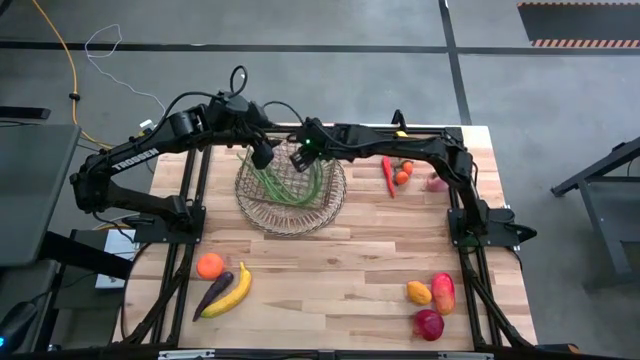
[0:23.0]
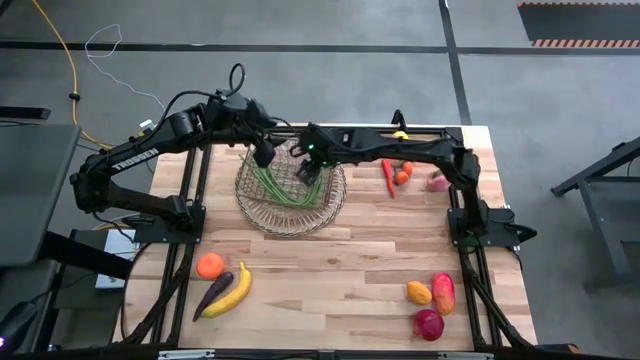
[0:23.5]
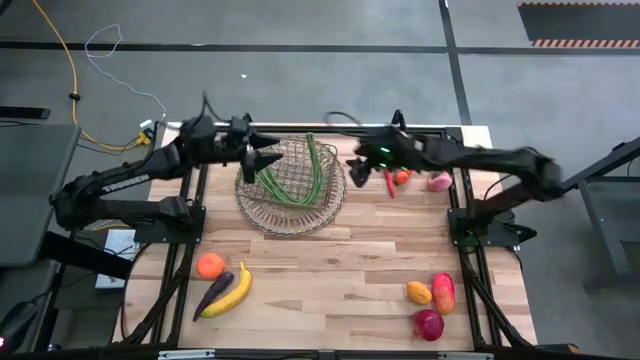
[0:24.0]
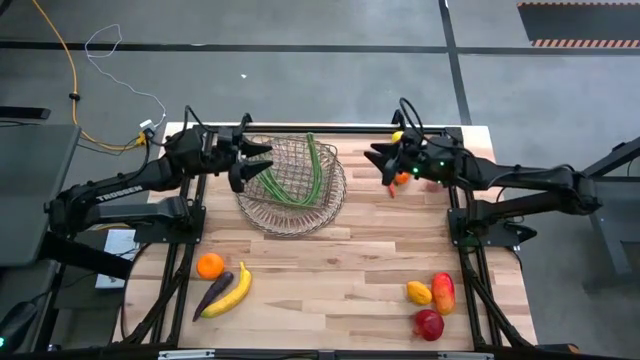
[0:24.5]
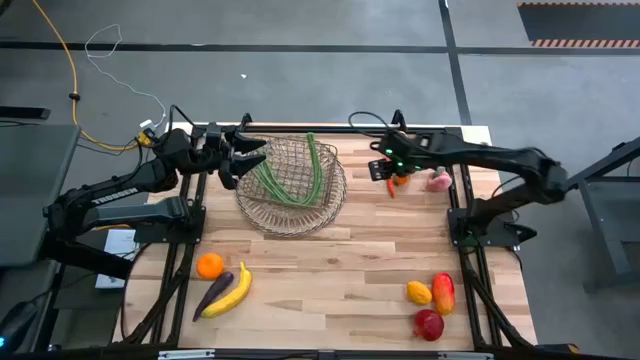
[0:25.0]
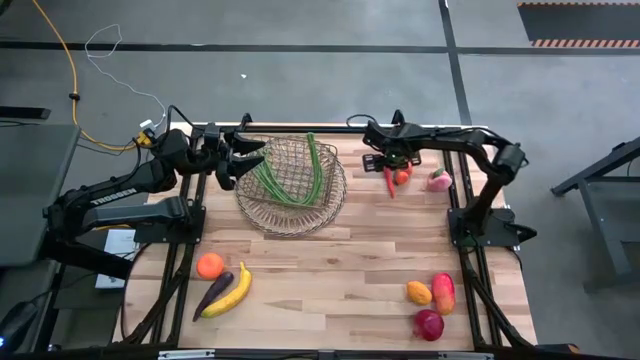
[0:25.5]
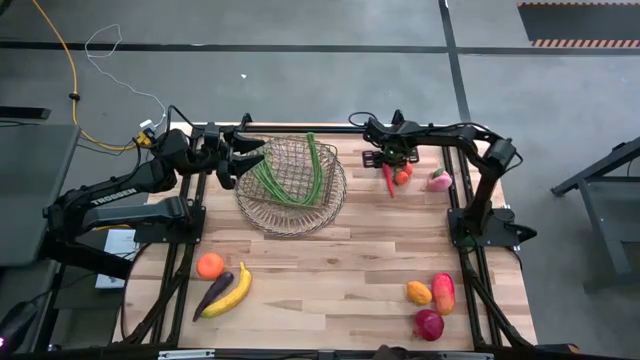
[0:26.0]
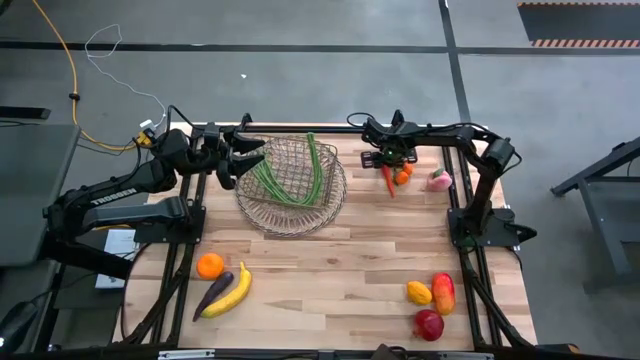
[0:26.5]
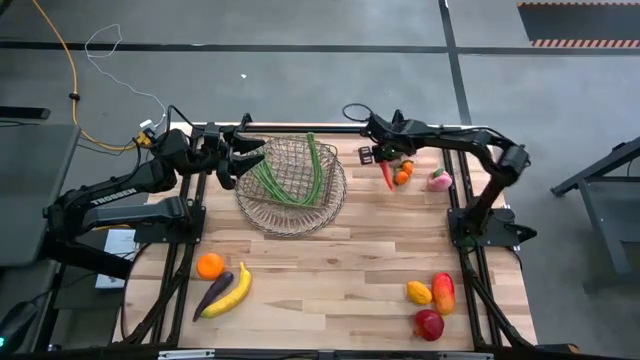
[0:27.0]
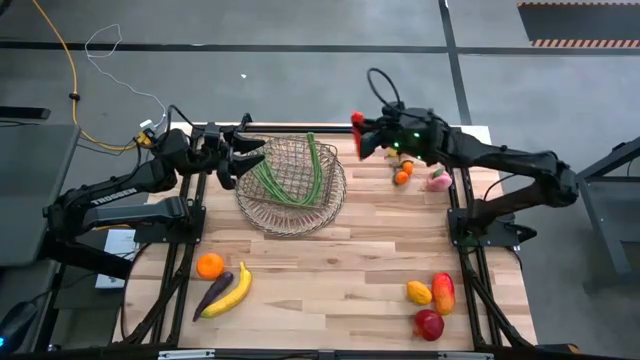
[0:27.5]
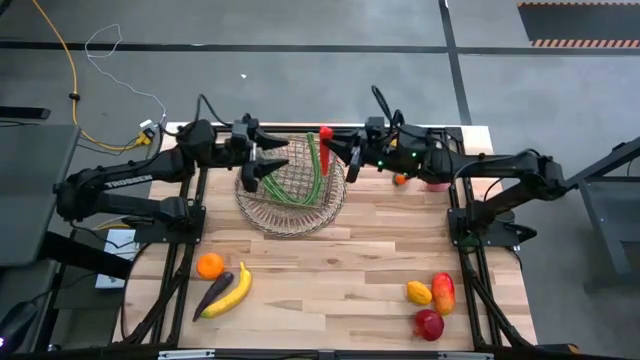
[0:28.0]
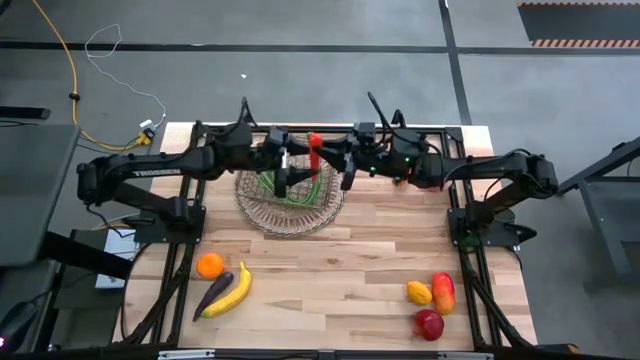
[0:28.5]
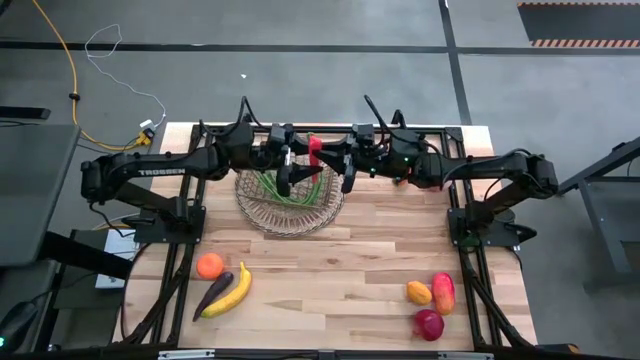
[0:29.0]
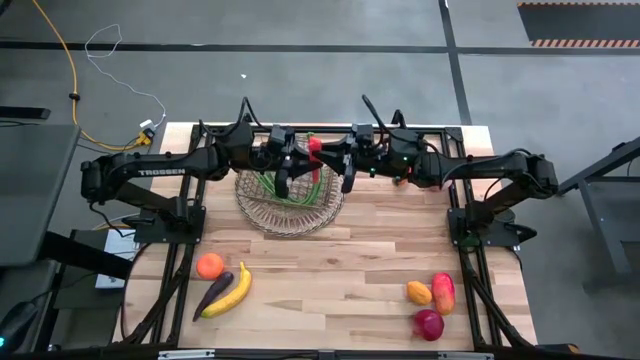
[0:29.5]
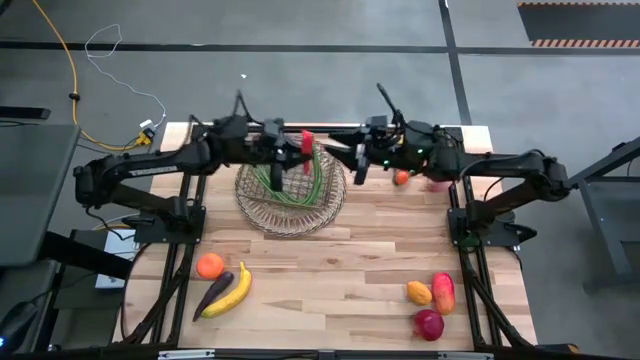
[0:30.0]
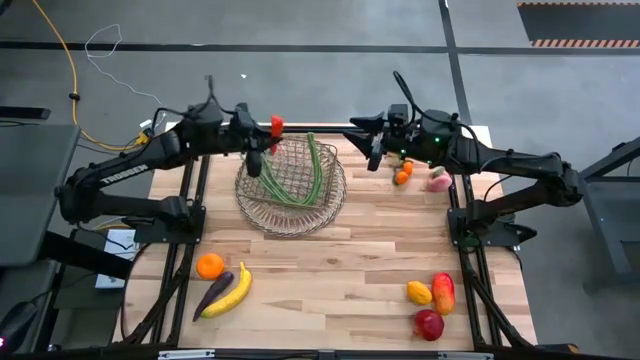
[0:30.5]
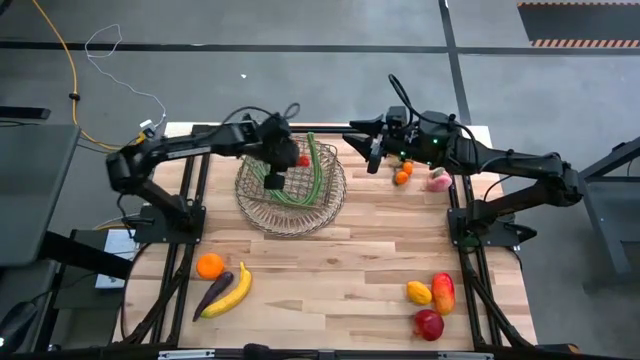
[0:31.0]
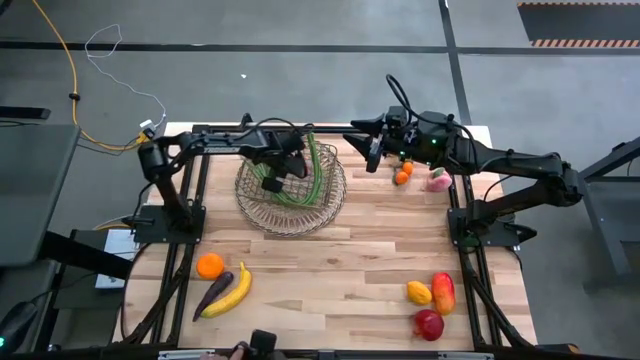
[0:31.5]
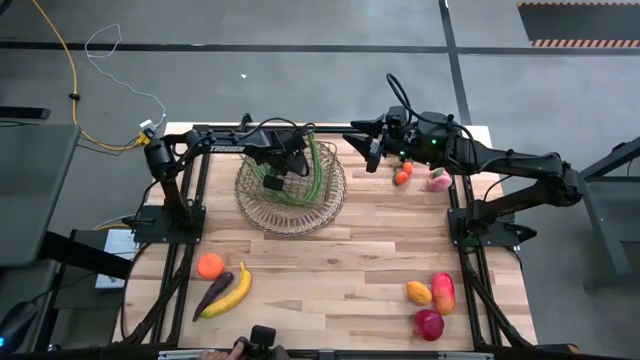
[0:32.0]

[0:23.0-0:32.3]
Task: Build produce basket
Put the orange carrot into the wire basket

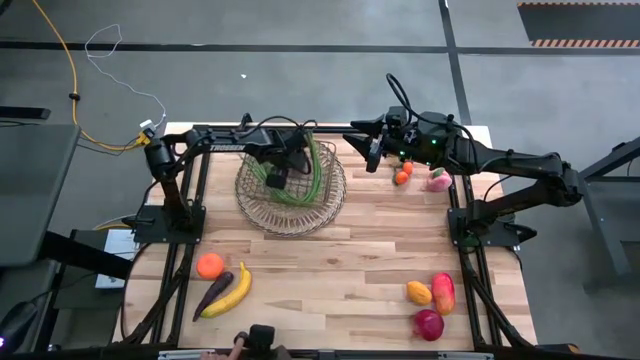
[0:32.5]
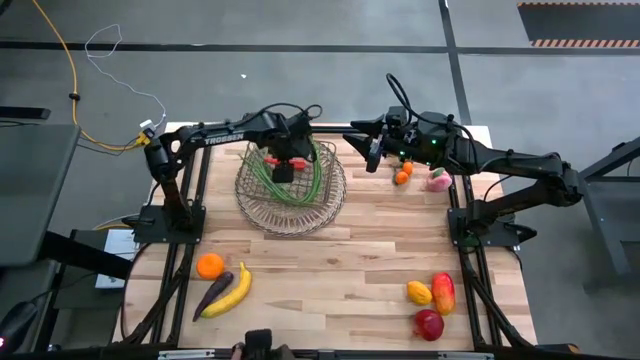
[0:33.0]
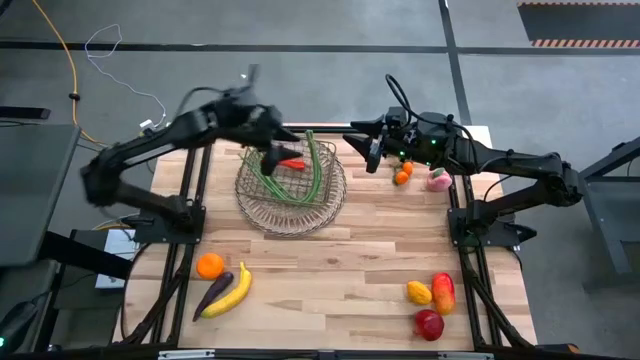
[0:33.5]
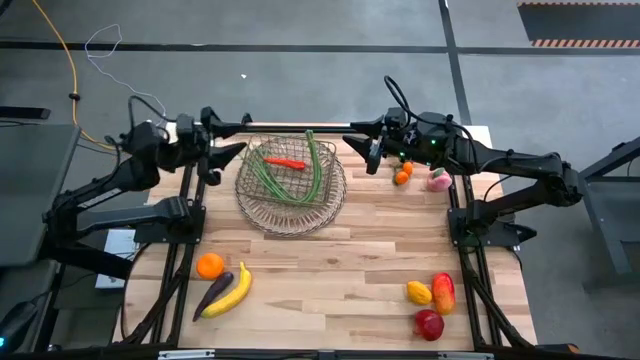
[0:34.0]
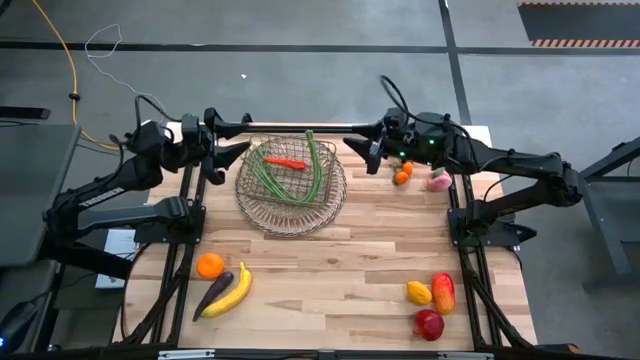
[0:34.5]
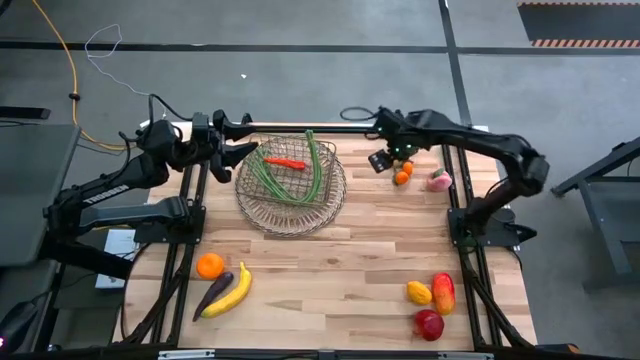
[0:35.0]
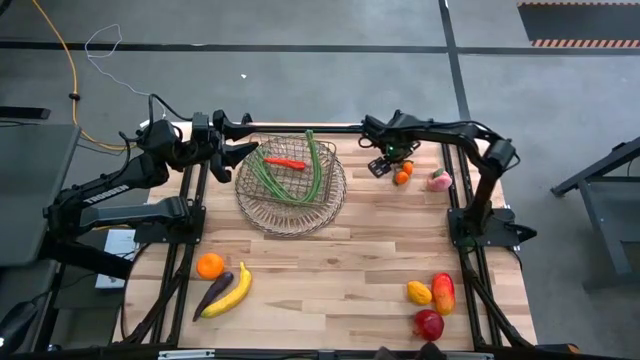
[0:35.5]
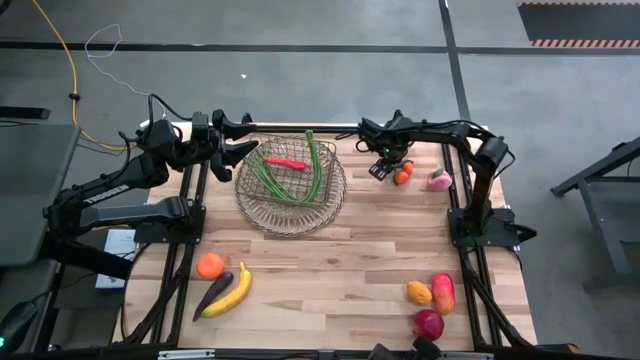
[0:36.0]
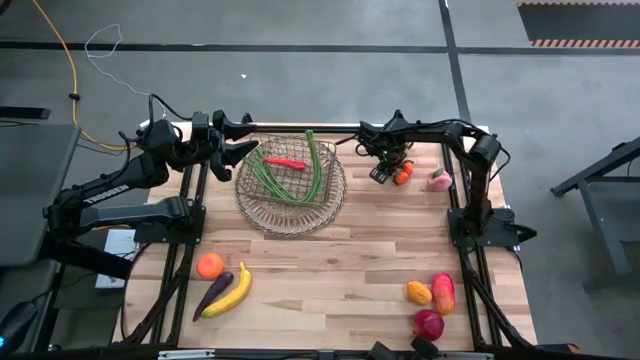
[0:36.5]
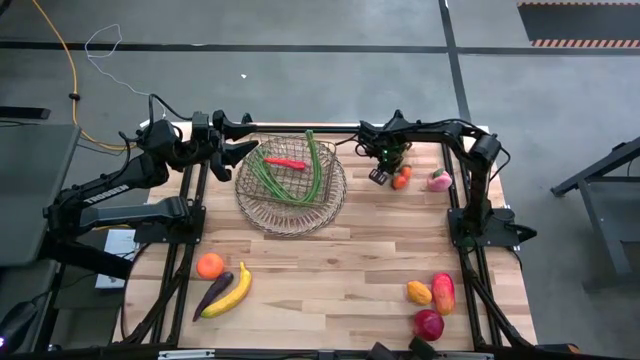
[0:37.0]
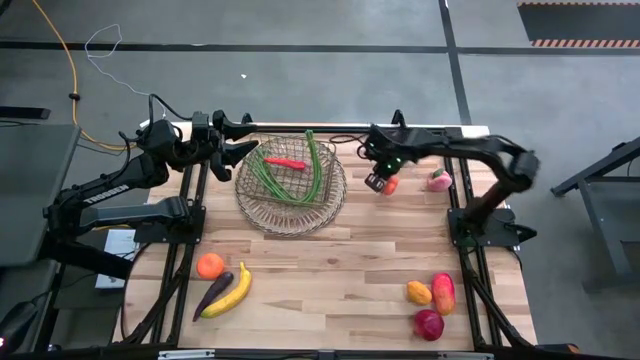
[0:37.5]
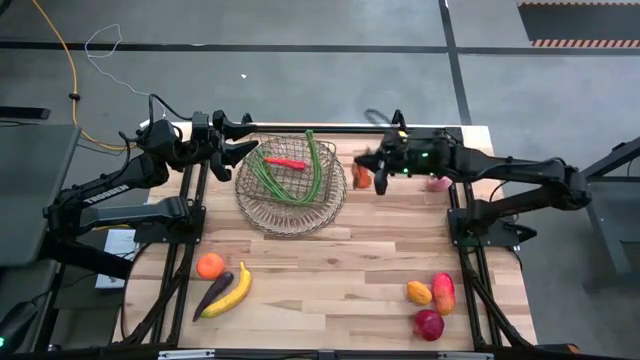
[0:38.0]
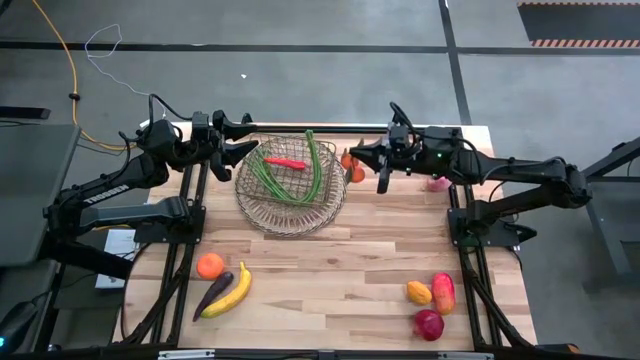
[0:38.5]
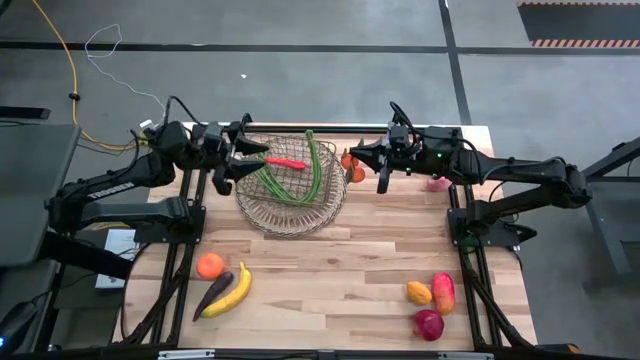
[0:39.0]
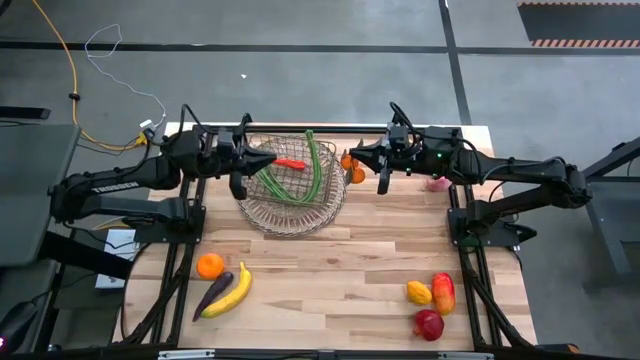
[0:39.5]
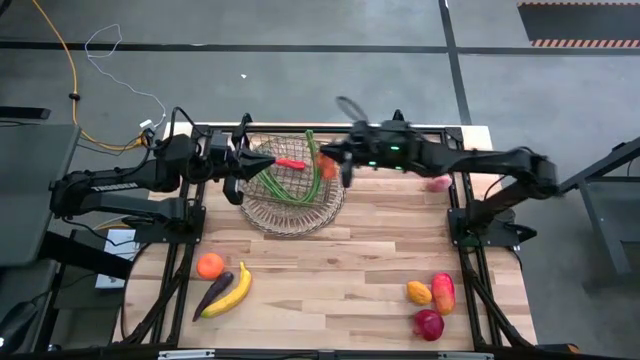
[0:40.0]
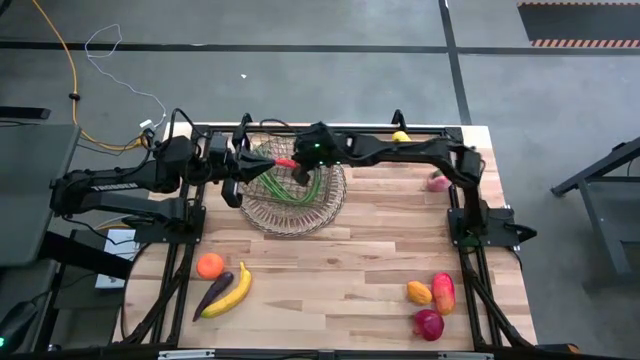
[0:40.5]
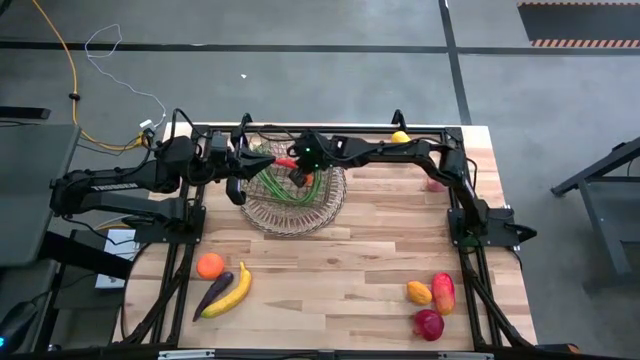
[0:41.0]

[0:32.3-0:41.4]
Put the oranges into the wire basket

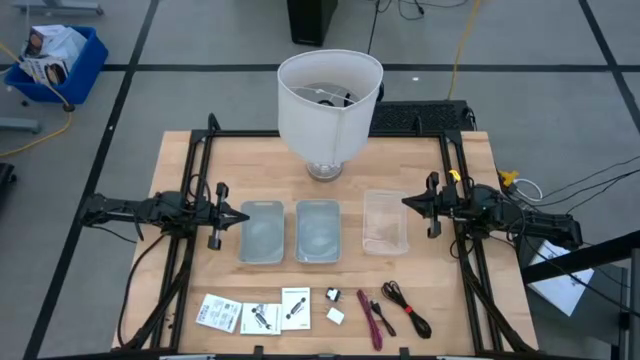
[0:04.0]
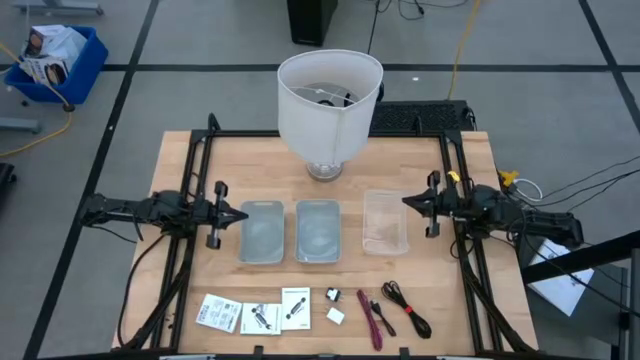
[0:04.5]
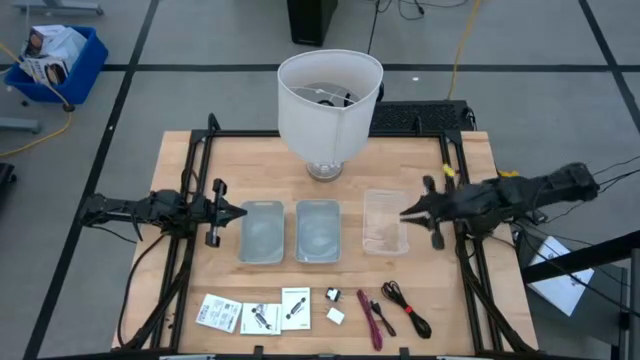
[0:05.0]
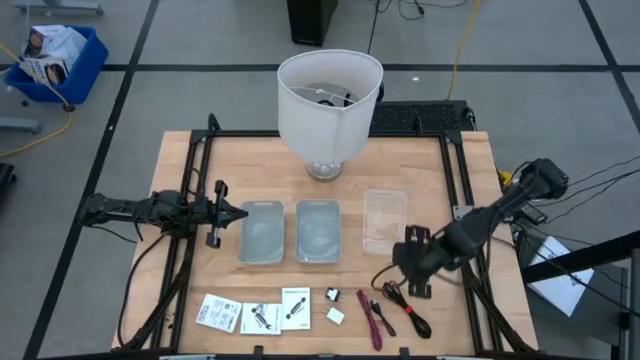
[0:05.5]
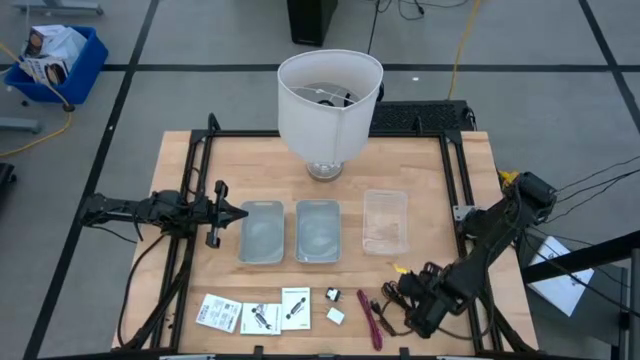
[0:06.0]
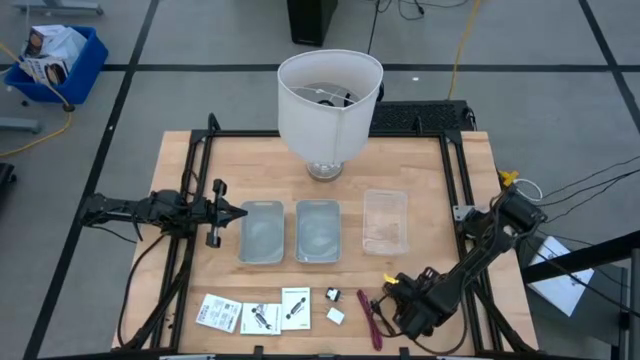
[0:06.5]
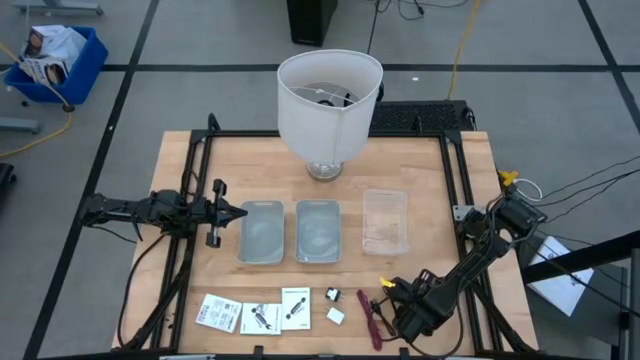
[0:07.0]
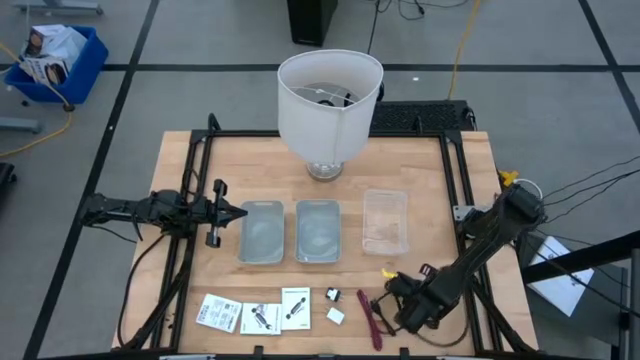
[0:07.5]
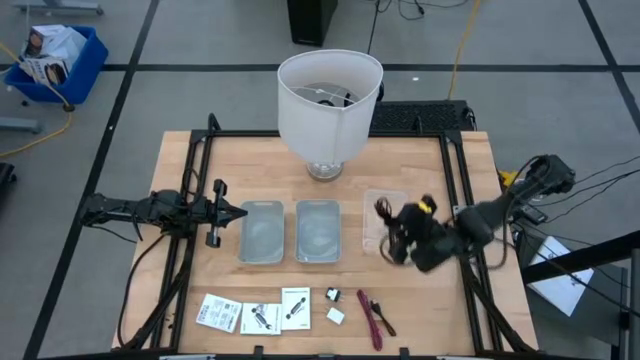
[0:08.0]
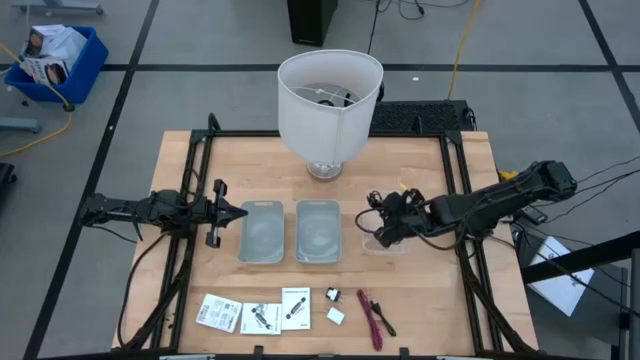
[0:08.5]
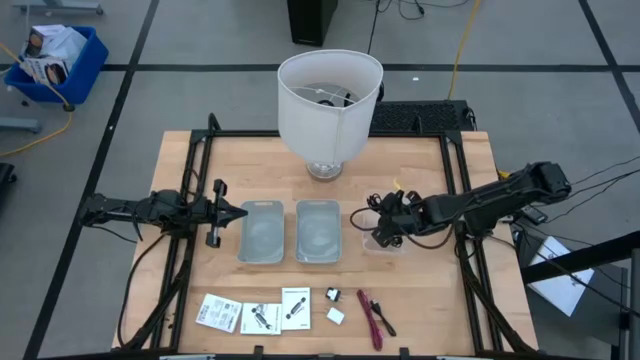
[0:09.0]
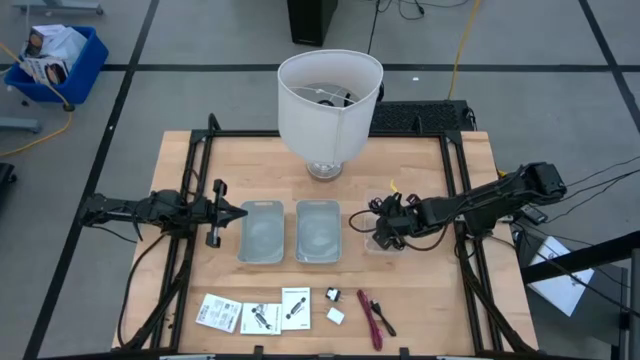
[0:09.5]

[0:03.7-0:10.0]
Task: Pick and place items into bin
Put the right black charger cable into the transparent bin
